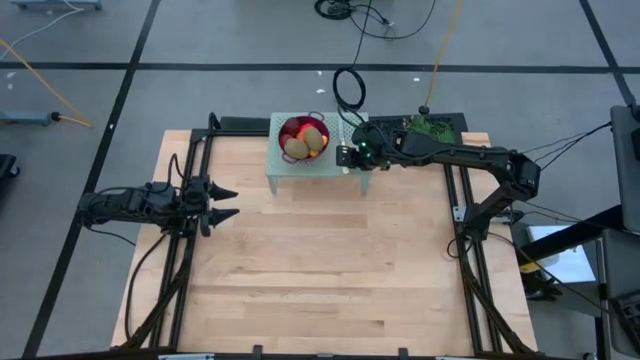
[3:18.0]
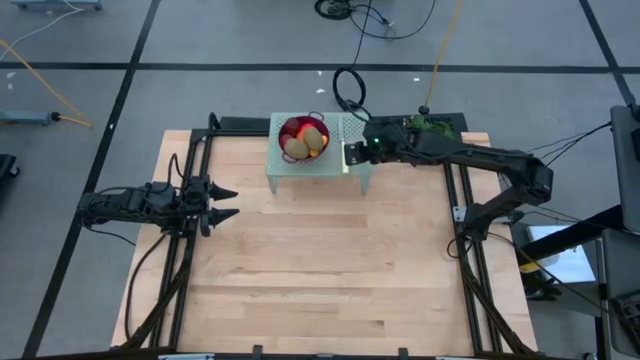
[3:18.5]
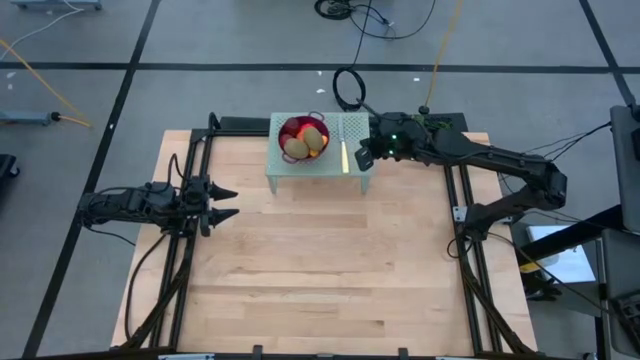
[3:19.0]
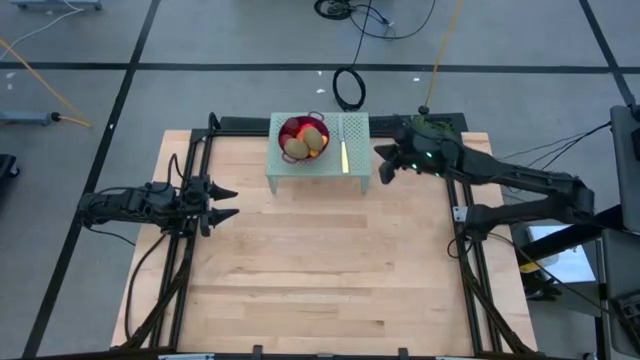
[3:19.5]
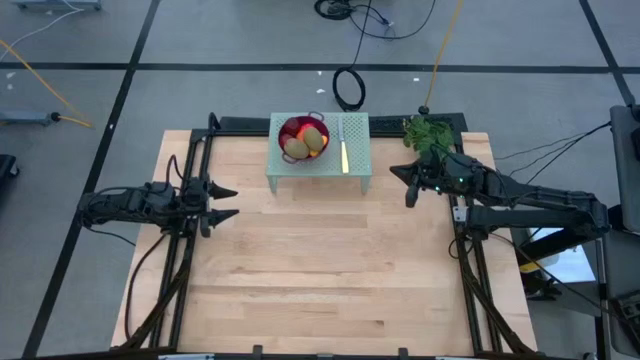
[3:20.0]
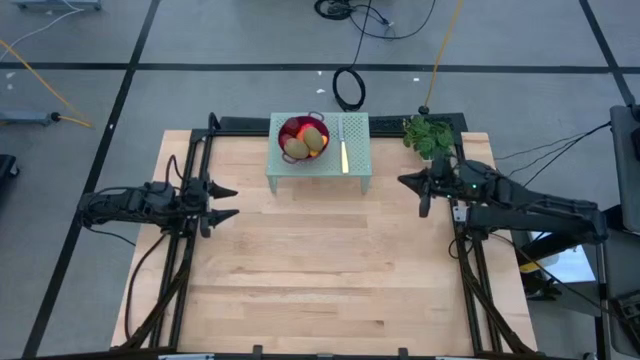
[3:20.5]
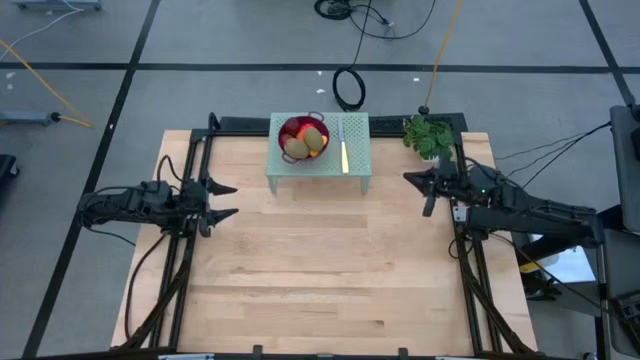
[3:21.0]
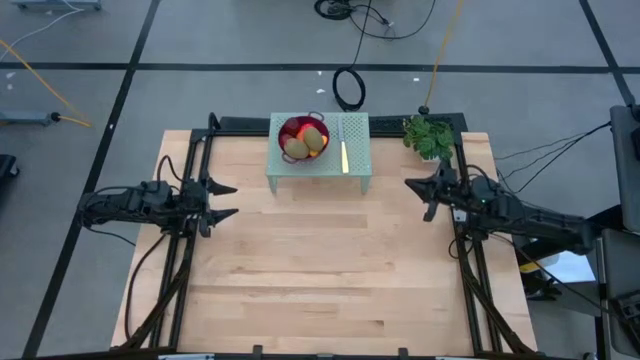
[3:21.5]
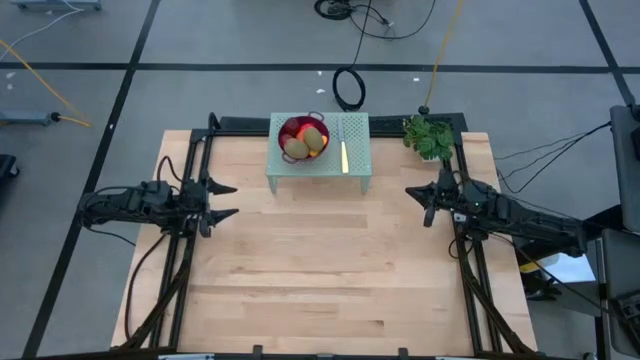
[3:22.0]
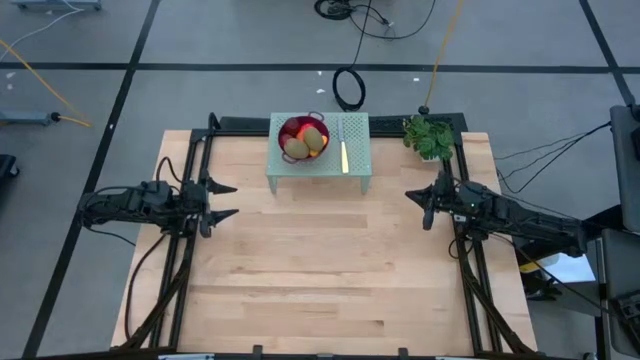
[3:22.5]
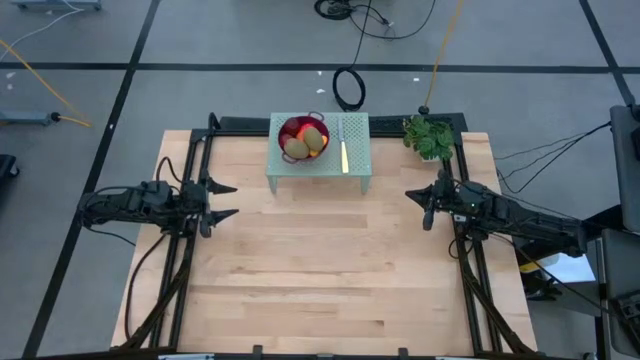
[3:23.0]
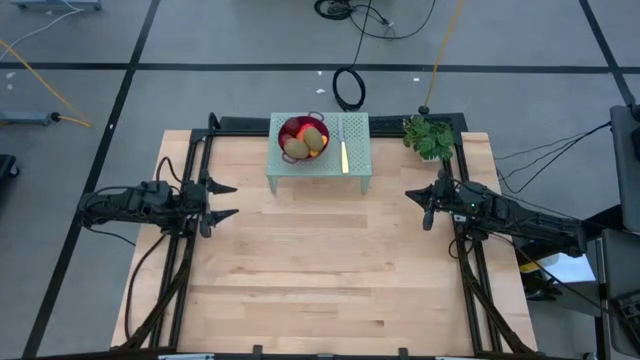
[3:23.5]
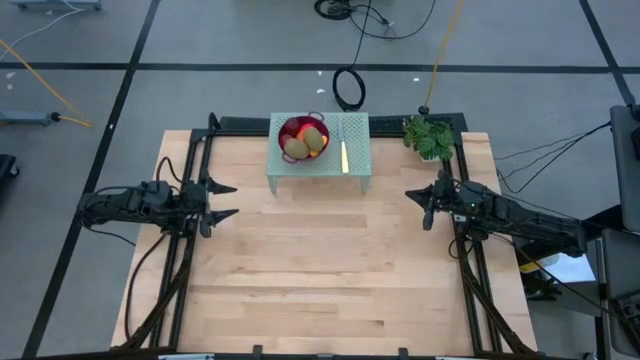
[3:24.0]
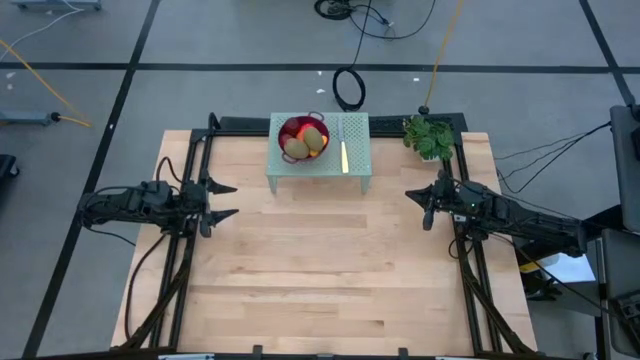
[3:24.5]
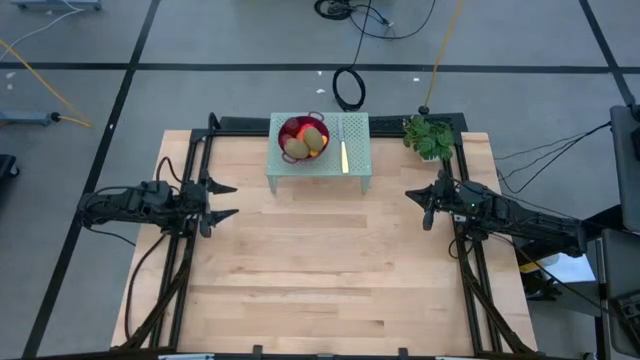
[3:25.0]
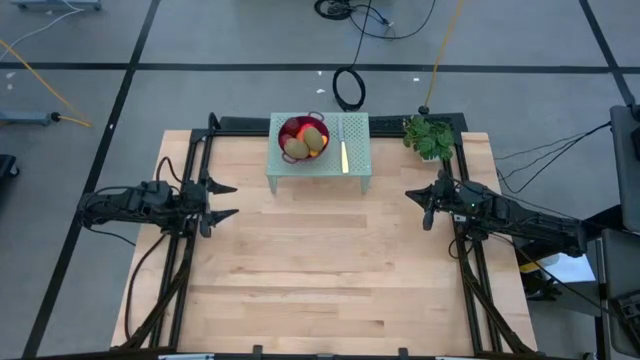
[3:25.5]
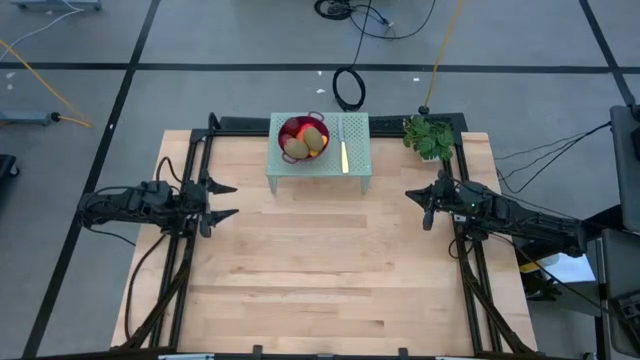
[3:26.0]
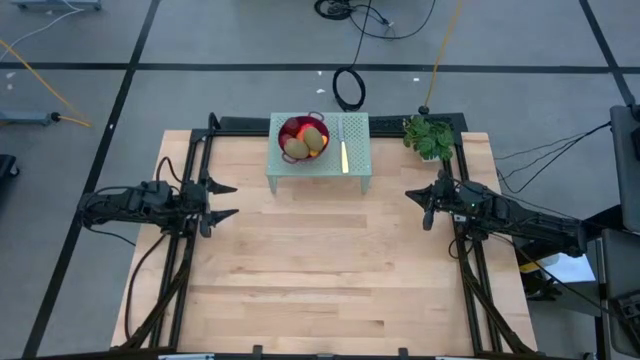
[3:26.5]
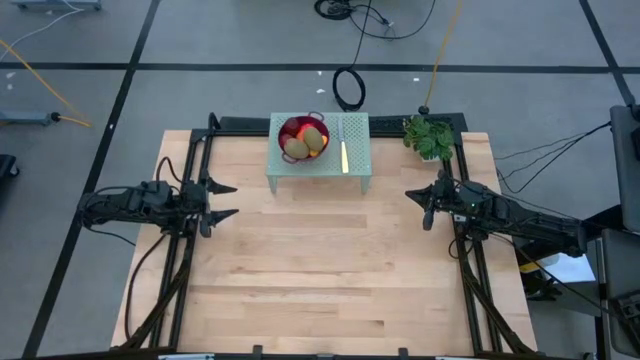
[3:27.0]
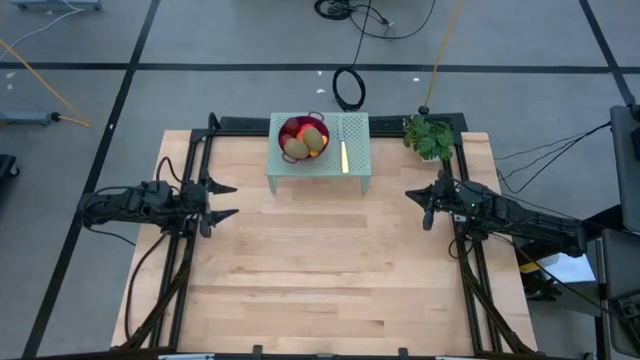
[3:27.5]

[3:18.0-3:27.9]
Task: Pick & Place Fruit
Return to home position

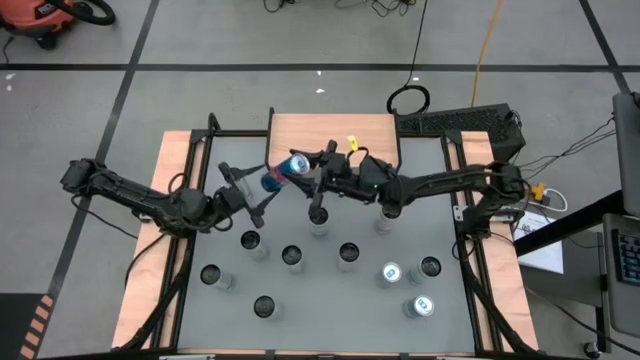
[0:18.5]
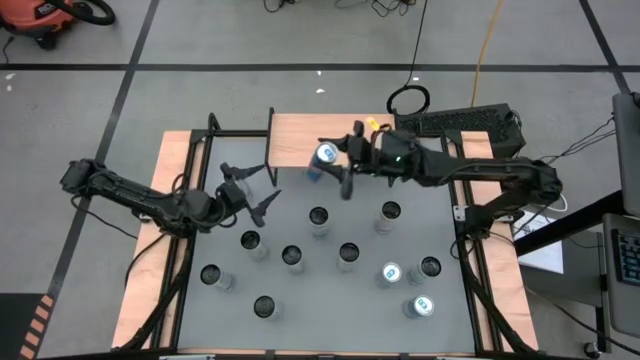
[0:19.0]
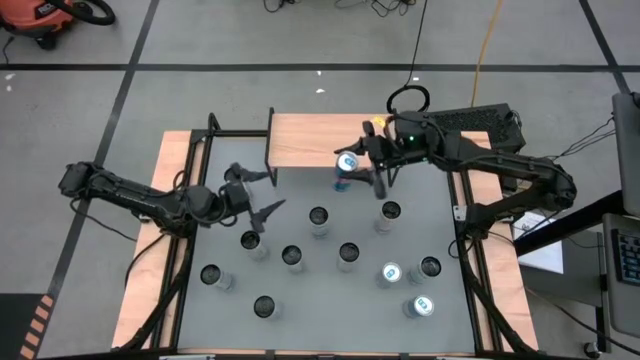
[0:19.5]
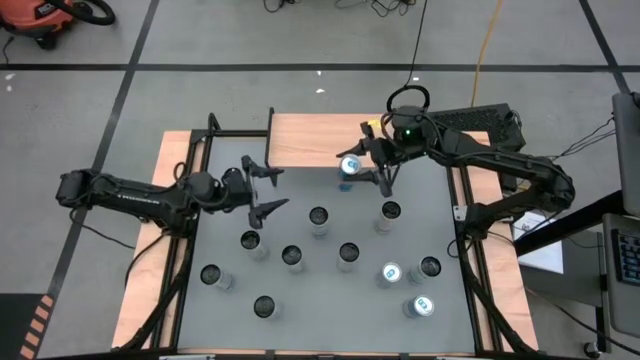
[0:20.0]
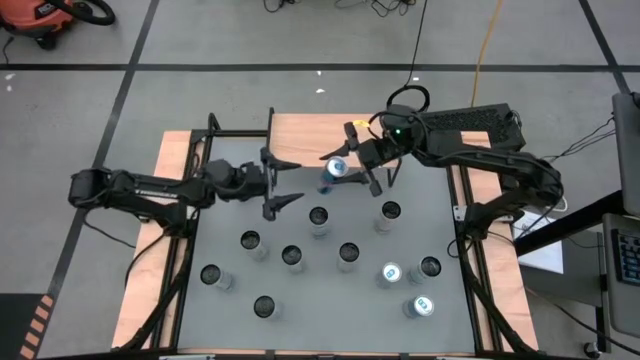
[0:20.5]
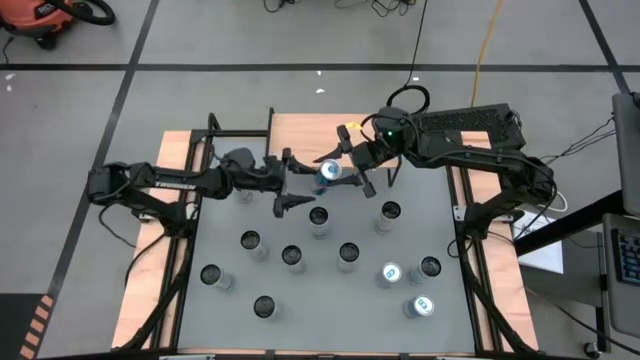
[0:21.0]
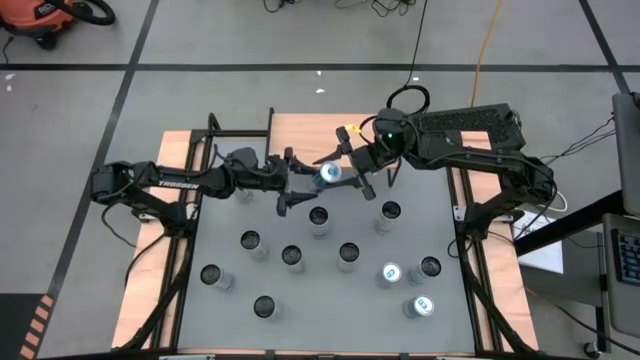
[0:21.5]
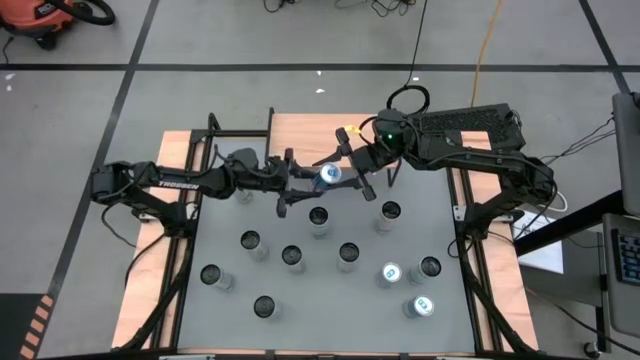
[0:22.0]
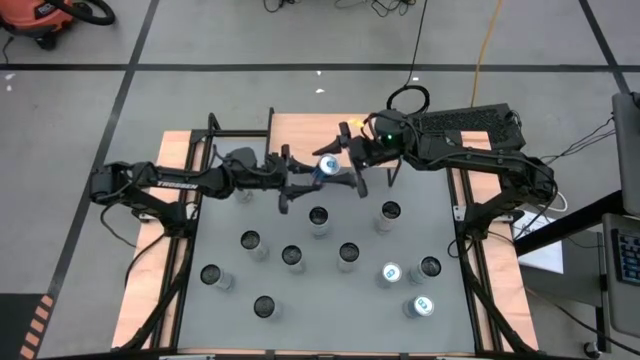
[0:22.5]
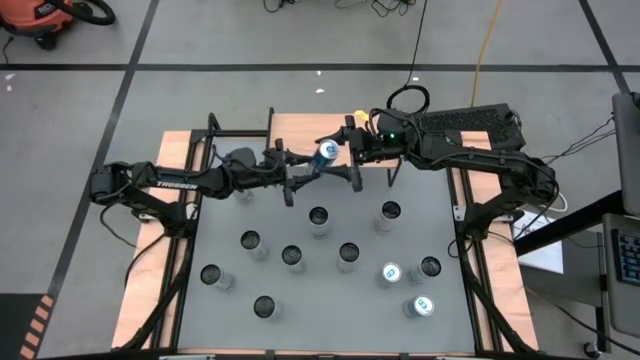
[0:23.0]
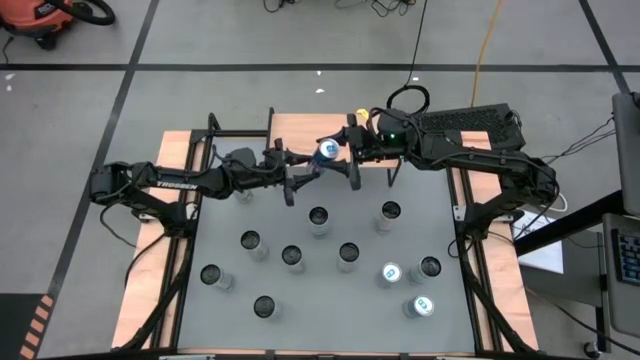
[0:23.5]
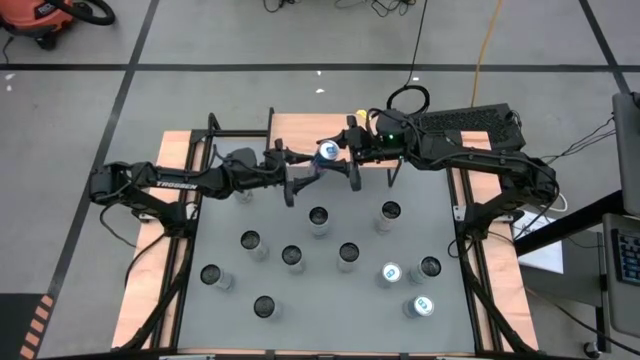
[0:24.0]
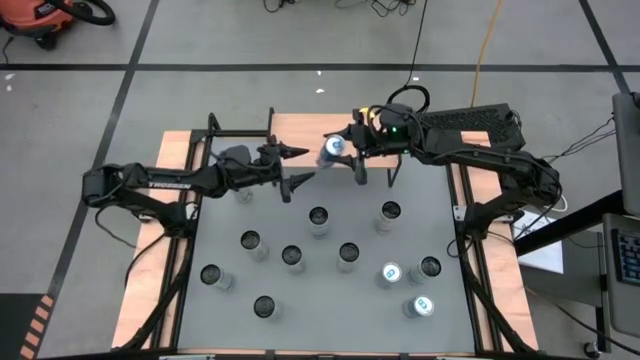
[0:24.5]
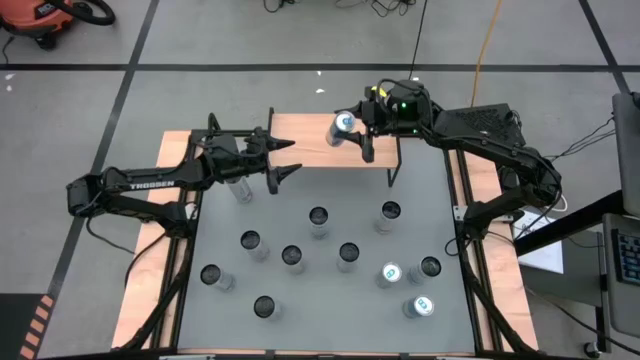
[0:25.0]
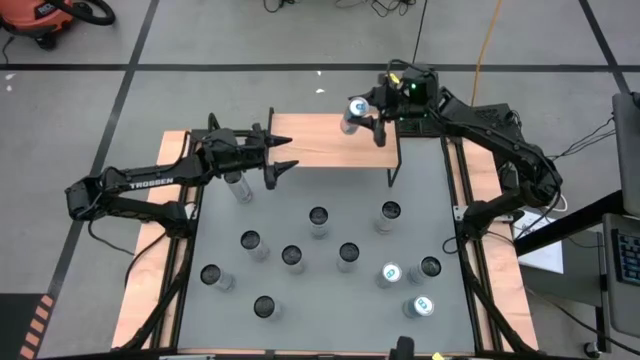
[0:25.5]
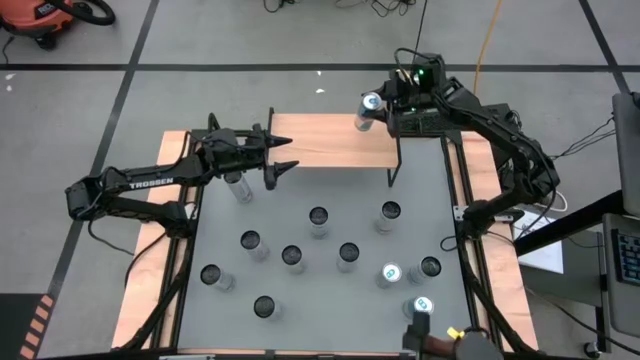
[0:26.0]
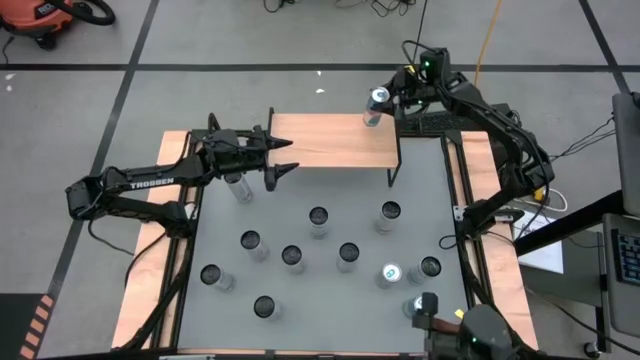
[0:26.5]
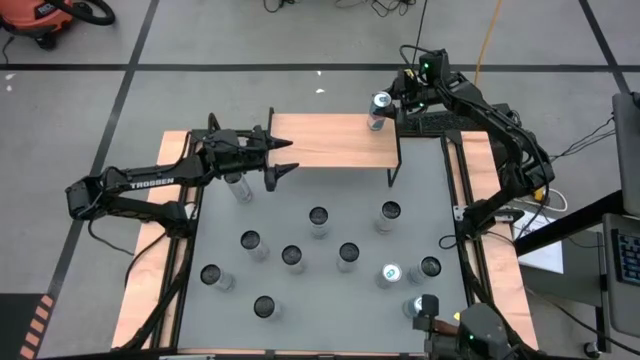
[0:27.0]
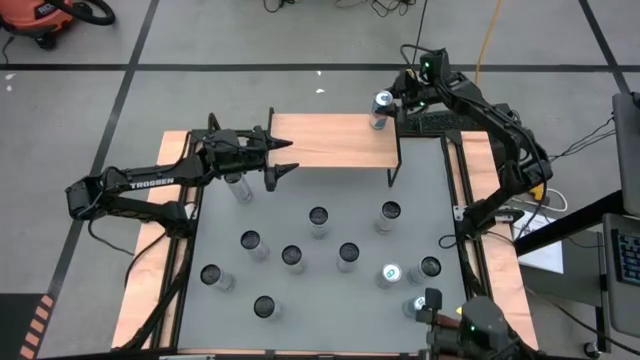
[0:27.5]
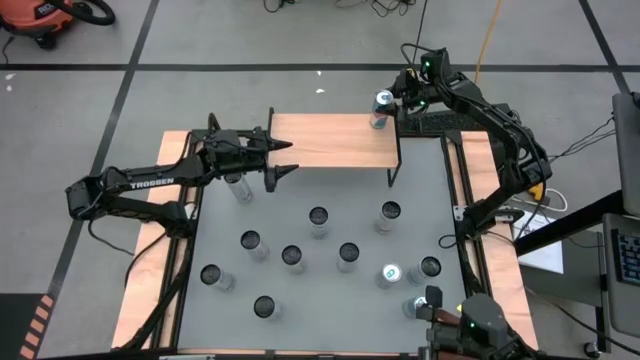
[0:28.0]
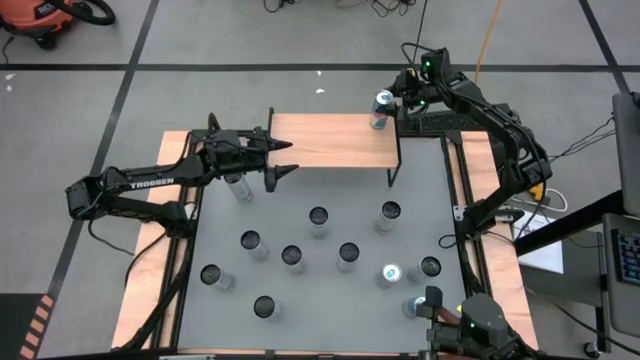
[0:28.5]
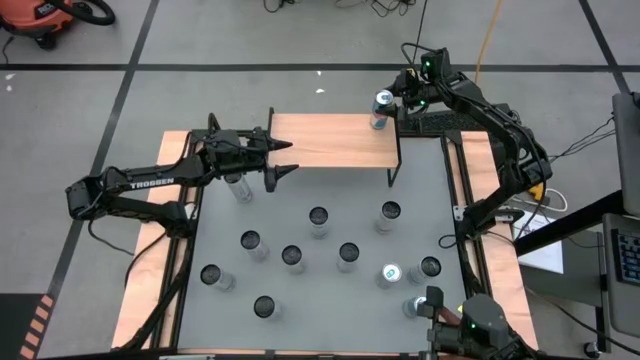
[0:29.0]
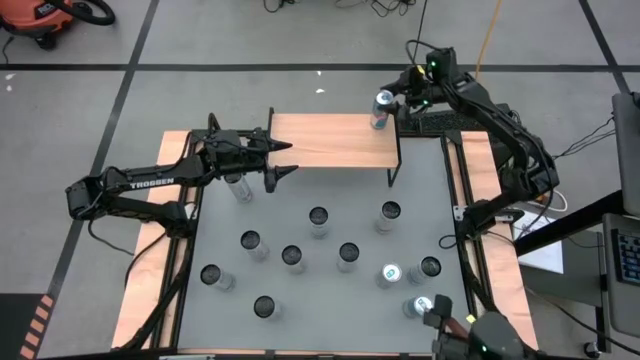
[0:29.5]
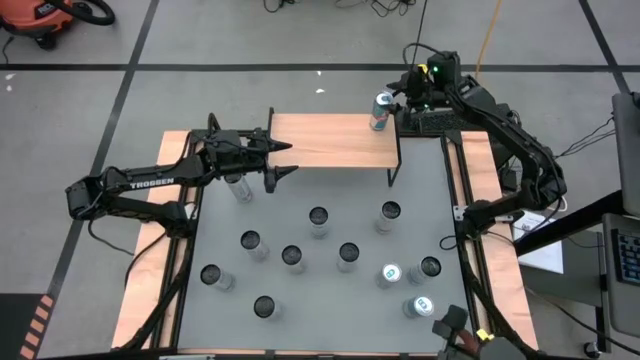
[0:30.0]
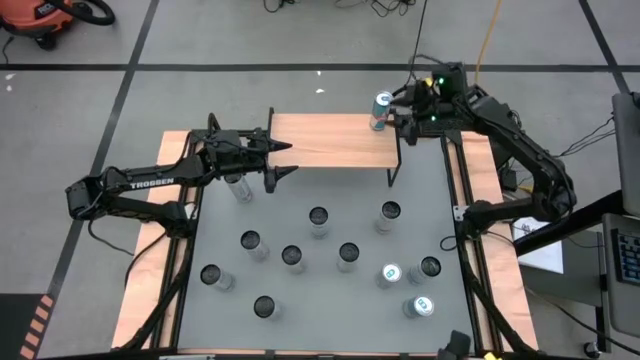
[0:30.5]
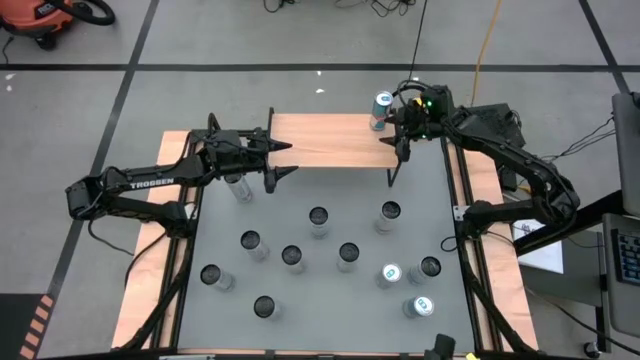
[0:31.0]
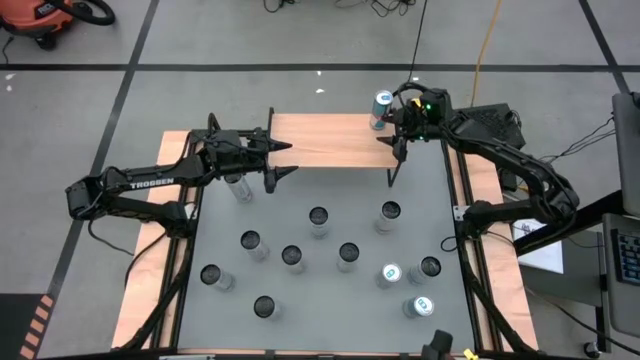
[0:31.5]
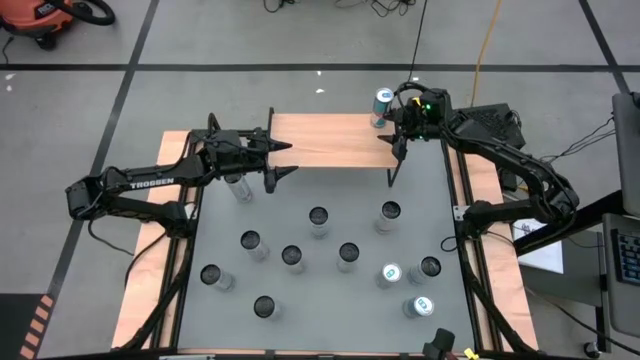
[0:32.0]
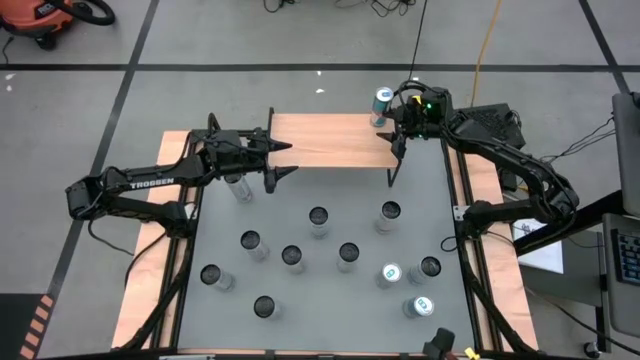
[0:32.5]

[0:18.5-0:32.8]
Task: Place canned beverage on shelf
Put the top blue soda can on the shelf
